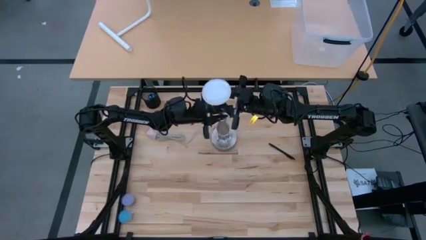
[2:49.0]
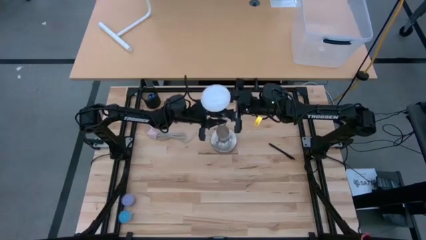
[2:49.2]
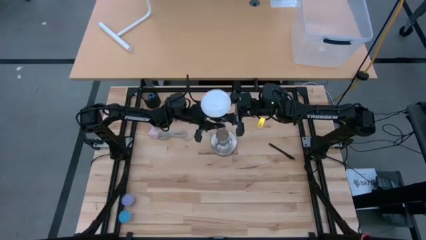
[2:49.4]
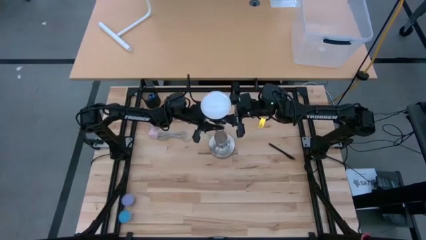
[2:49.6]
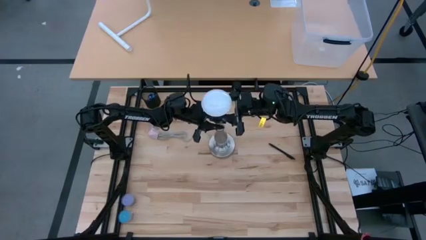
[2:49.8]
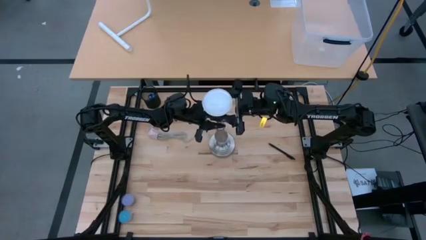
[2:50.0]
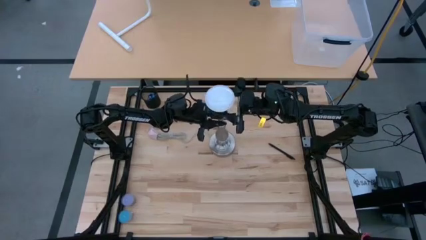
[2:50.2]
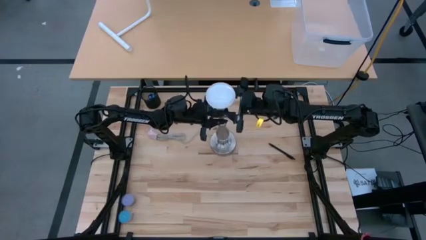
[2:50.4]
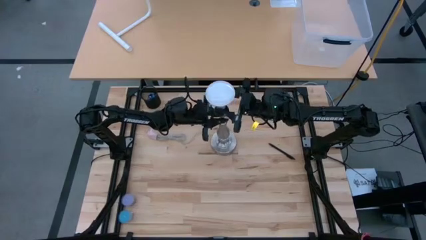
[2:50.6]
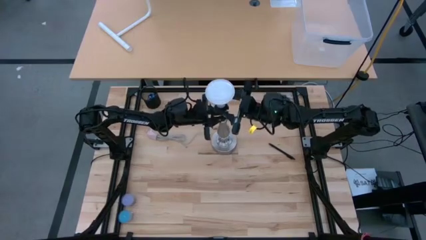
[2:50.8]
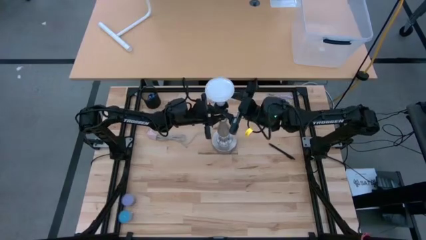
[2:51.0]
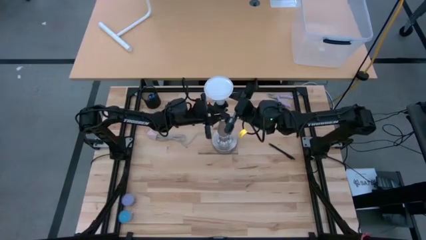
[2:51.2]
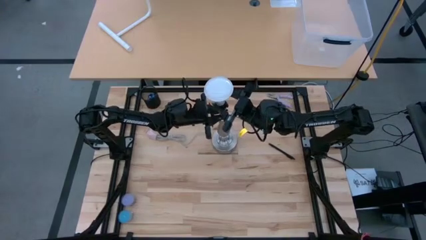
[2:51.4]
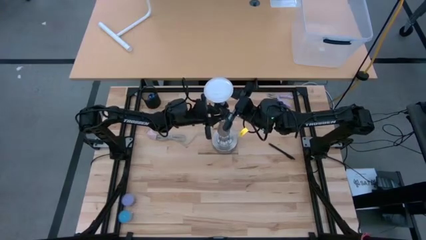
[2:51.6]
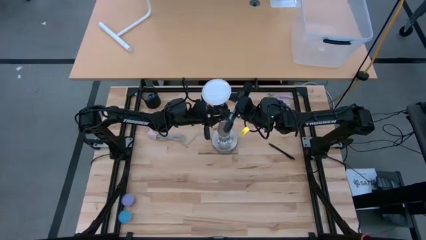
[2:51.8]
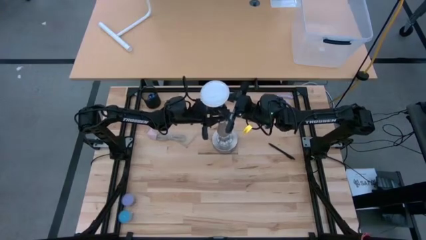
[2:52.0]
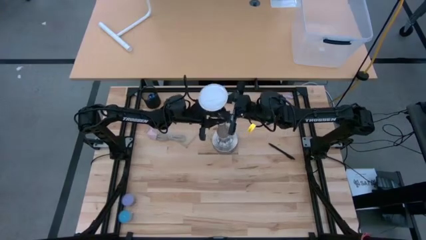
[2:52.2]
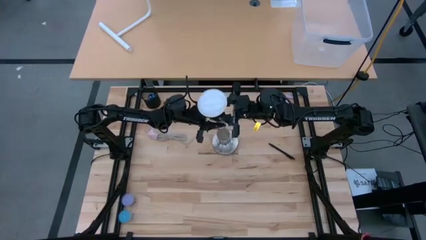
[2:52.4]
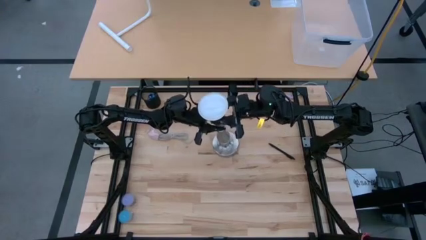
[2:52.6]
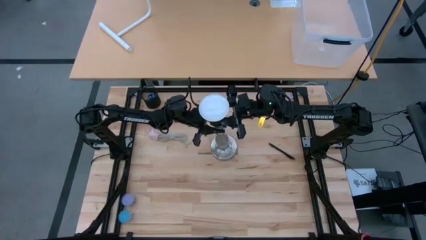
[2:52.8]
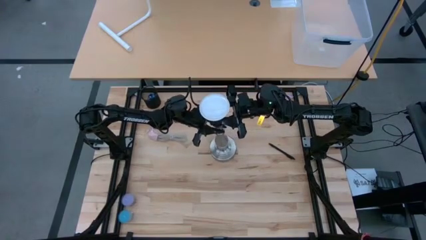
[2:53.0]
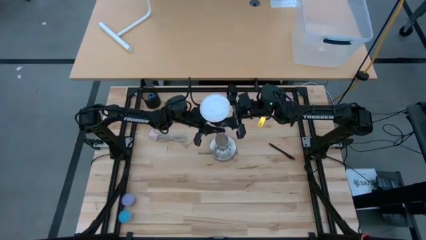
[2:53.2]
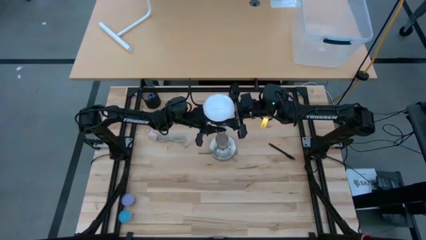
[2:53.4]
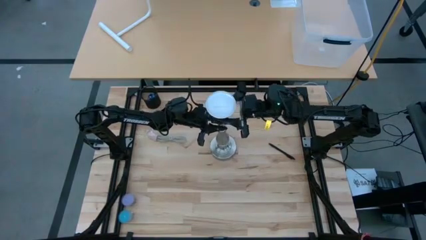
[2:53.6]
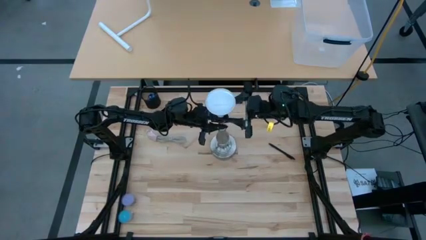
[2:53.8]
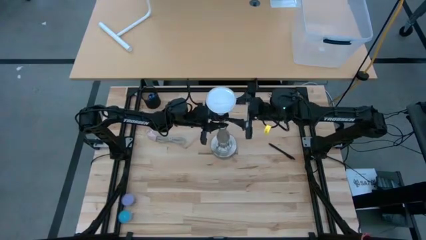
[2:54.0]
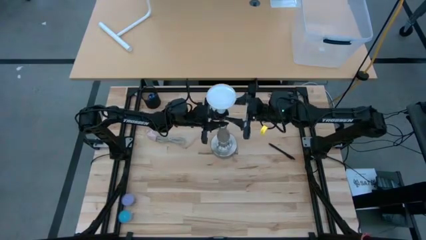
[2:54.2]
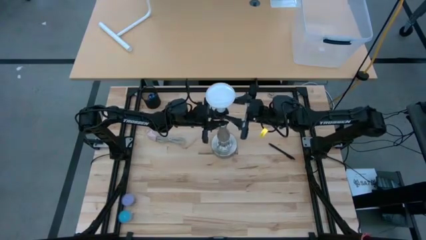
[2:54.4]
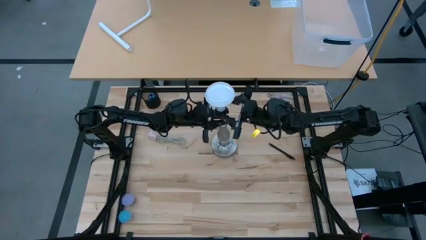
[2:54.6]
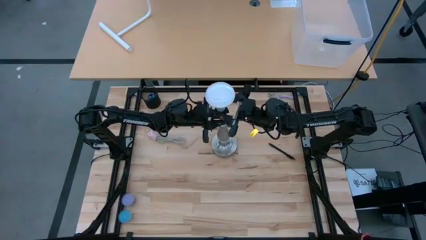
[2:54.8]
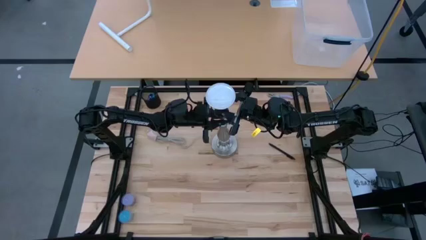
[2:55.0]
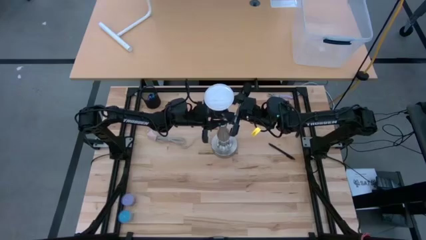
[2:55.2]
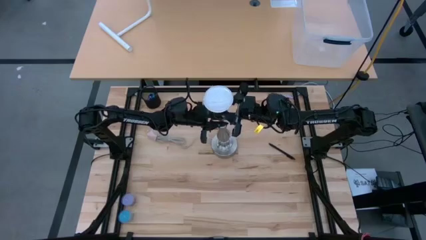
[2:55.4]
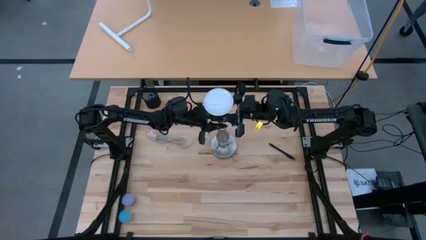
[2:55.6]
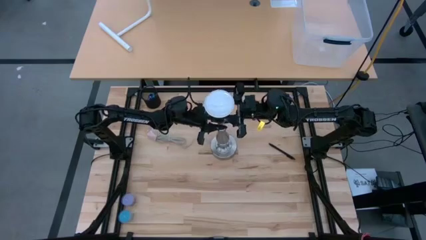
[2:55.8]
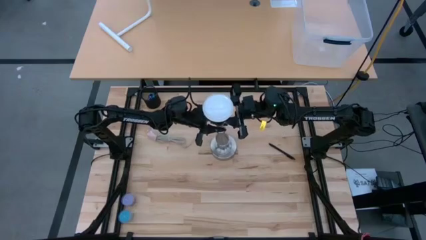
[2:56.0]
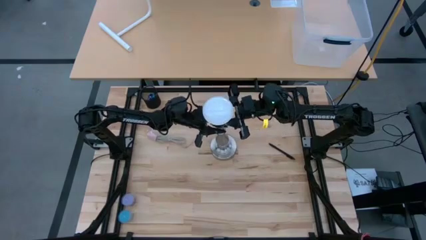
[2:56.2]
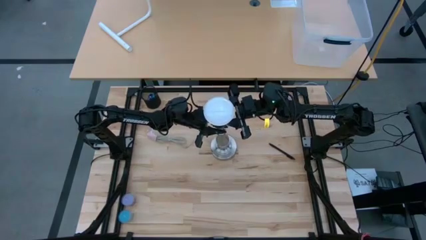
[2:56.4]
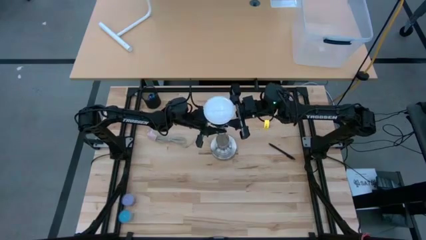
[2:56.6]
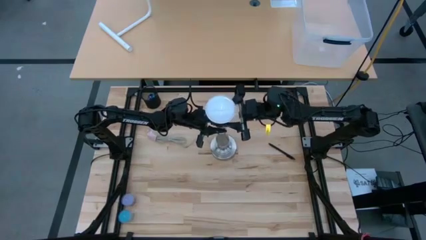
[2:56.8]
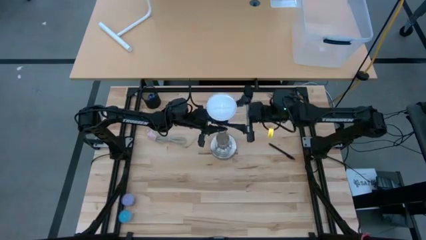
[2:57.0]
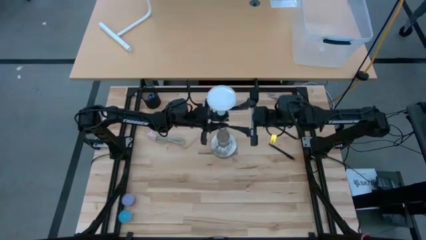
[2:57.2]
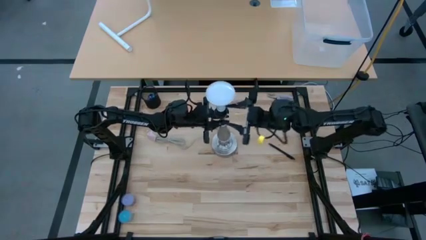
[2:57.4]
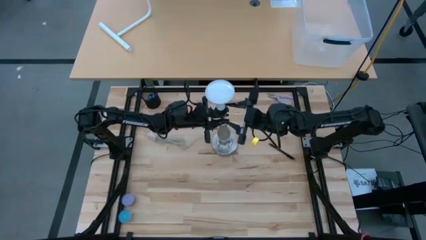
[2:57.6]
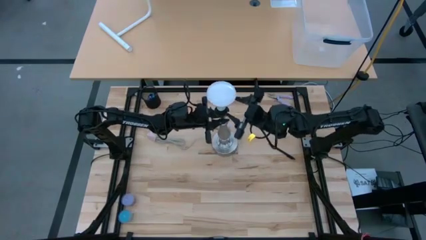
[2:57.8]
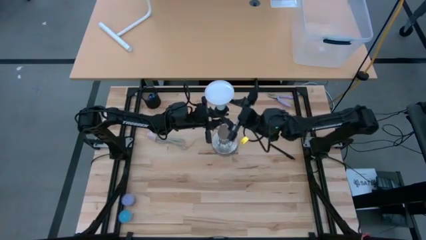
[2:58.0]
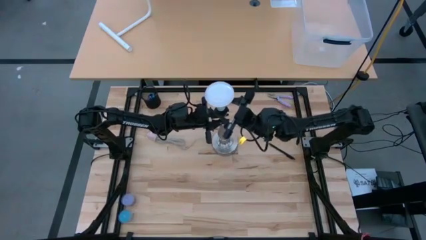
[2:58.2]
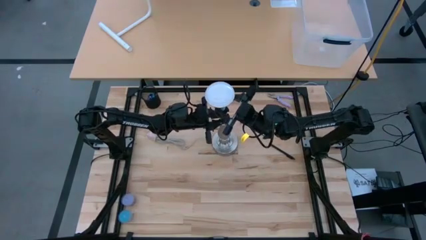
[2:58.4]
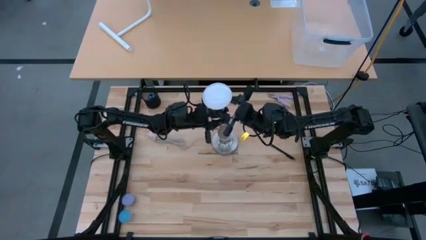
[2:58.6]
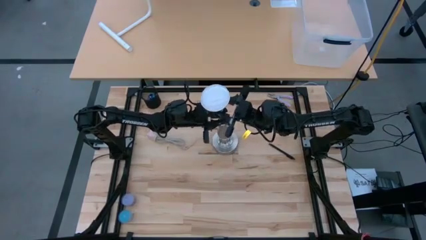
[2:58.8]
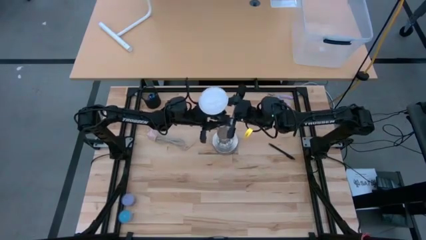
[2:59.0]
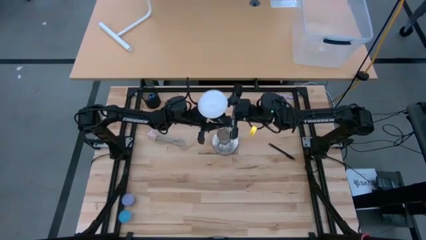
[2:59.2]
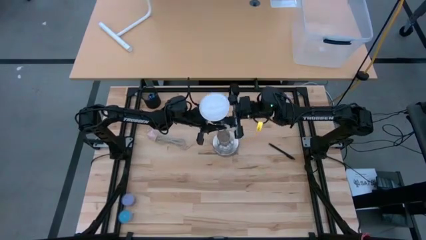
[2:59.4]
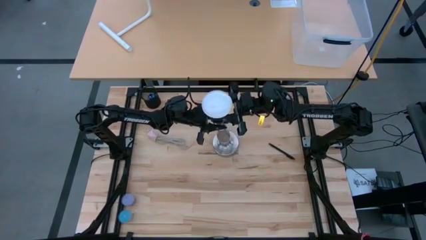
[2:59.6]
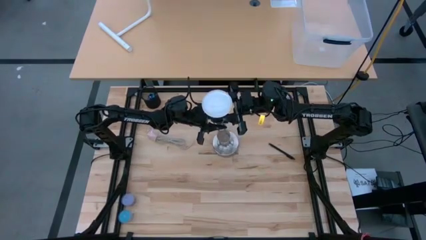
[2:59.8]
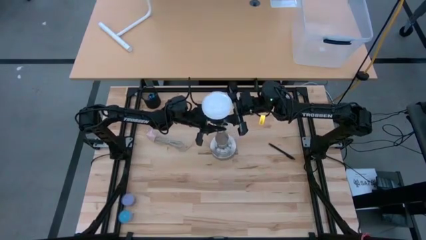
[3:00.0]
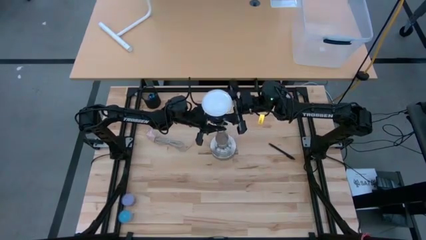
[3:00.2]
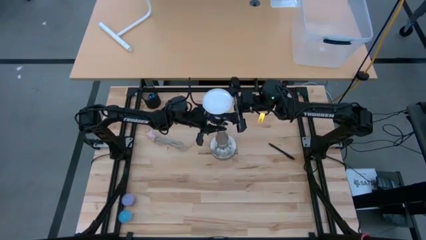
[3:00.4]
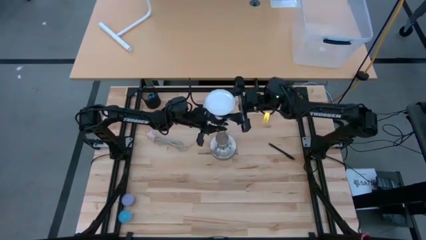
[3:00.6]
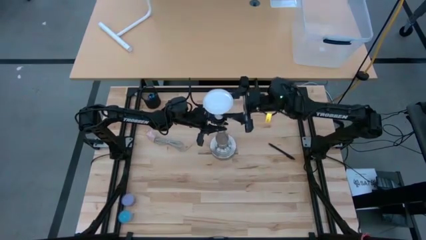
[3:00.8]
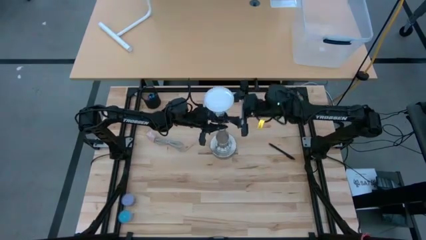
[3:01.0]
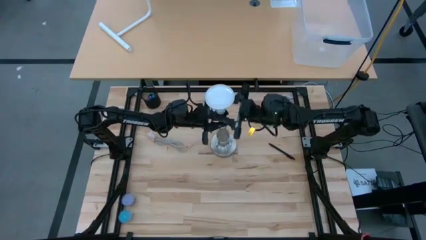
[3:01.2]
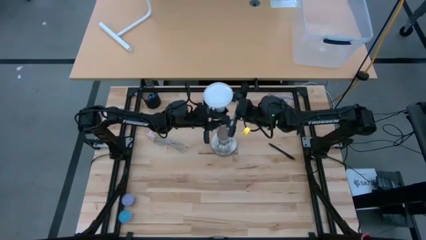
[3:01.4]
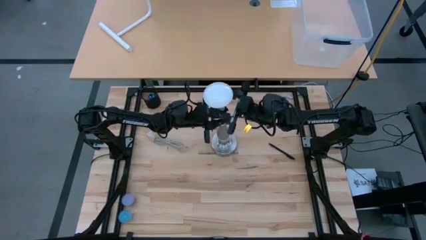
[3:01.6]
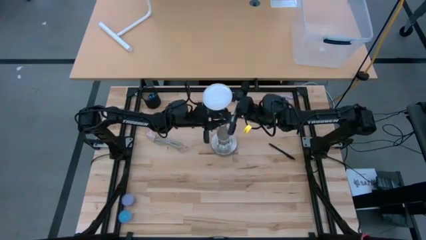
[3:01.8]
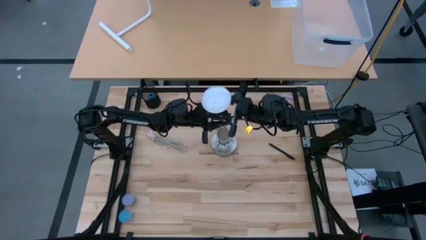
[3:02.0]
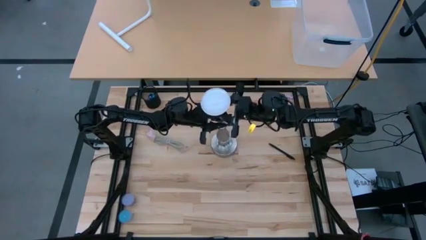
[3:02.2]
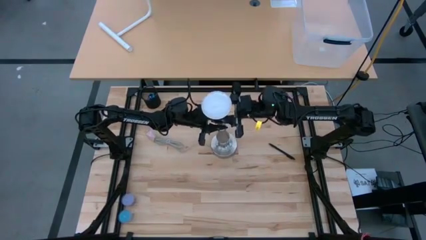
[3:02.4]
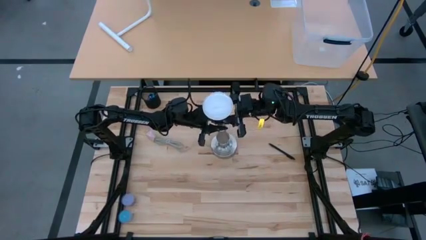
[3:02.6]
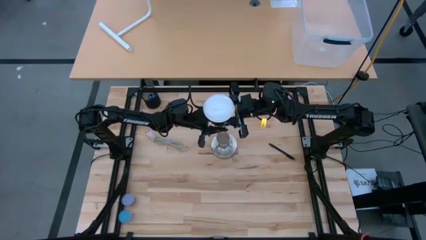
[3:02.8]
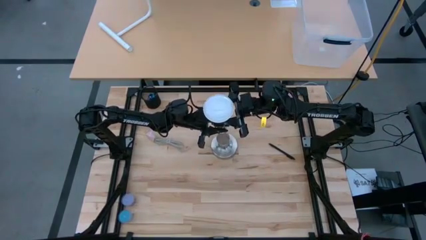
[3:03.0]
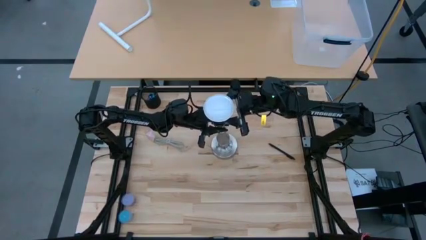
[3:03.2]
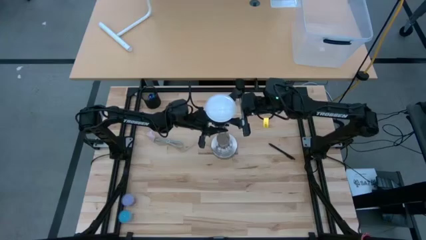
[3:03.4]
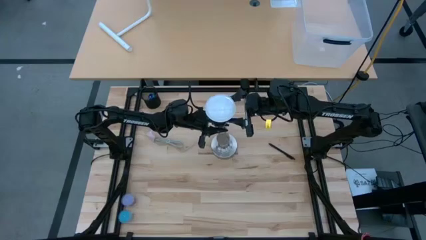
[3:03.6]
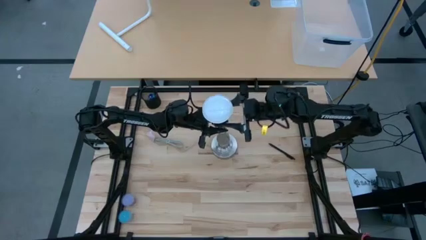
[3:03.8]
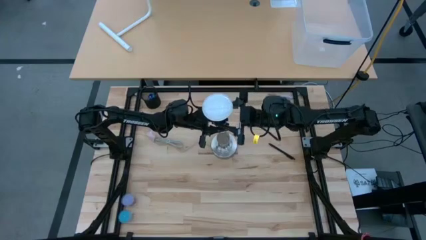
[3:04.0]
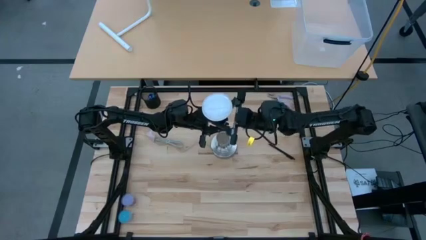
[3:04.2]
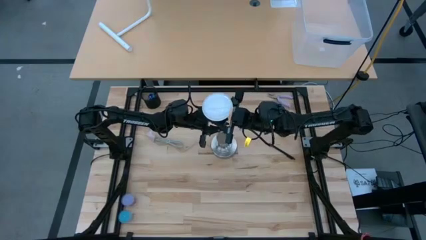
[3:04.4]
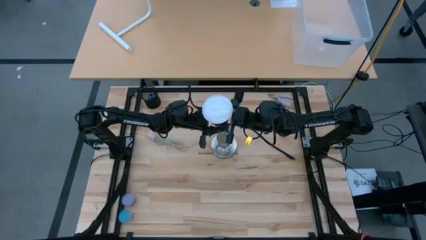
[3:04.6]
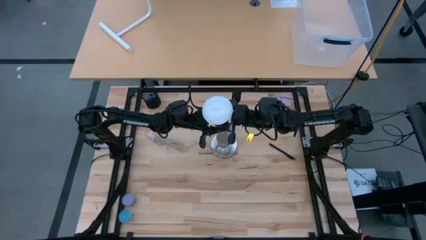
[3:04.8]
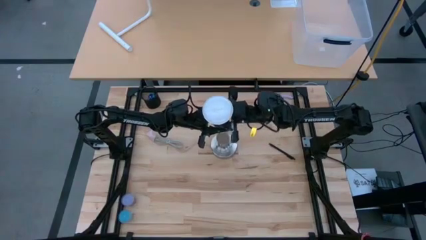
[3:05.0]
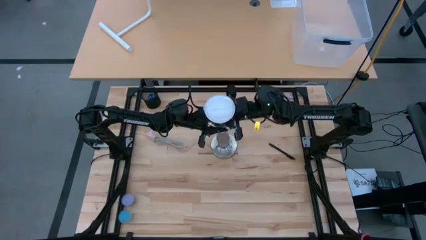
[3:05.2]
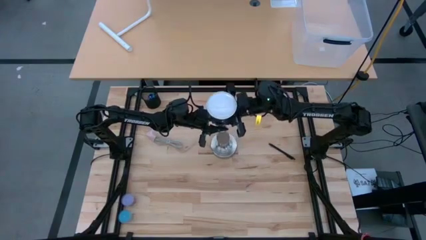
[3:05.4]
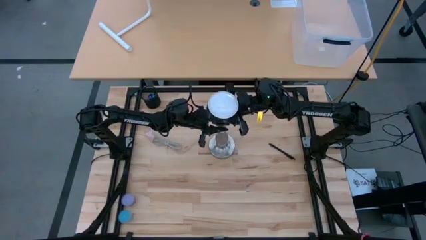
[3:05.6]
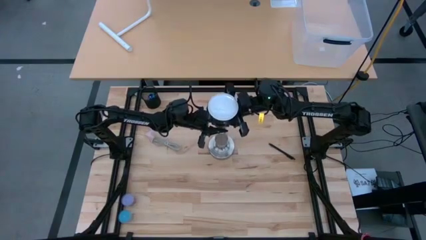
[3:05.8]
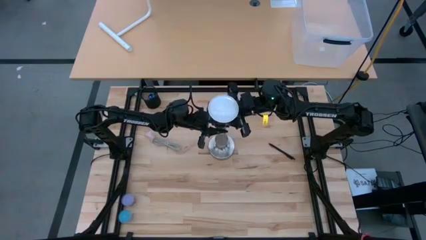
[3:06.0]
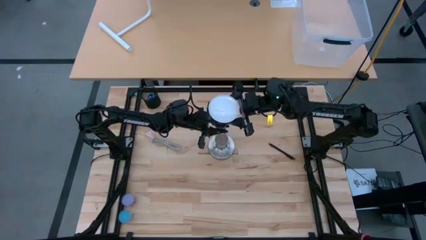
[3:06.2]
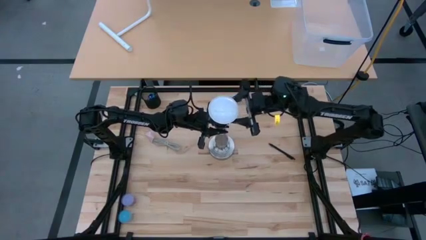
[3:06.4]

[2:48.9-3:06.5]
Task: Screw lightbulb
Remove the lightbulb from the lamp
